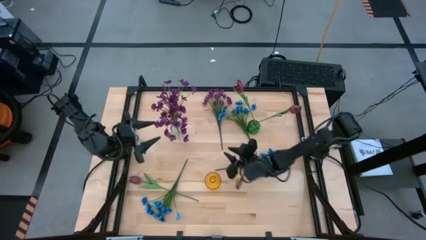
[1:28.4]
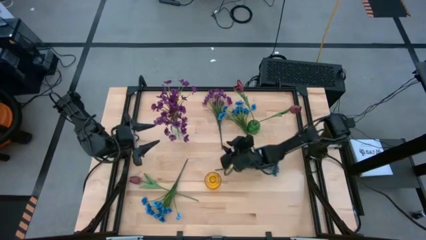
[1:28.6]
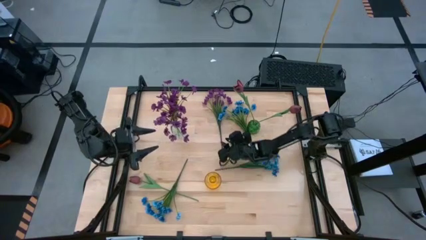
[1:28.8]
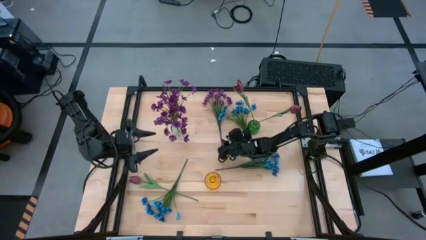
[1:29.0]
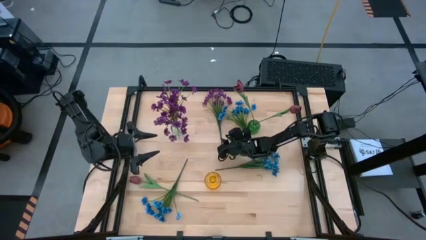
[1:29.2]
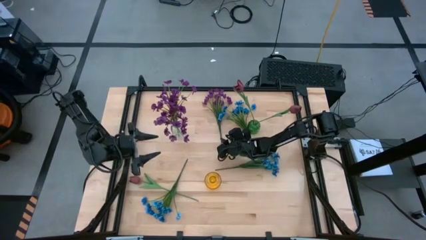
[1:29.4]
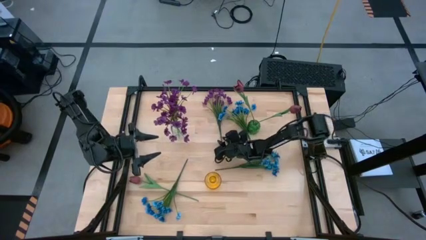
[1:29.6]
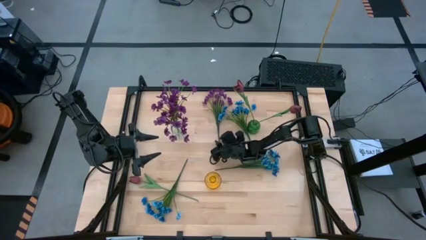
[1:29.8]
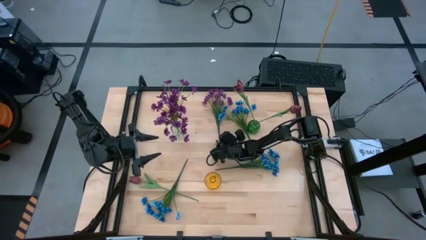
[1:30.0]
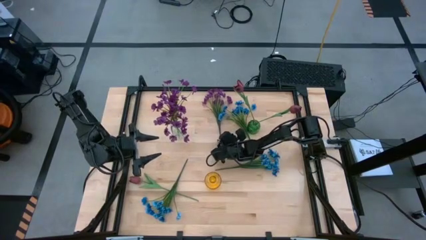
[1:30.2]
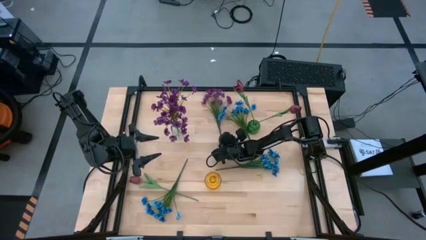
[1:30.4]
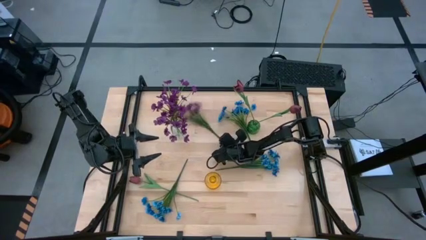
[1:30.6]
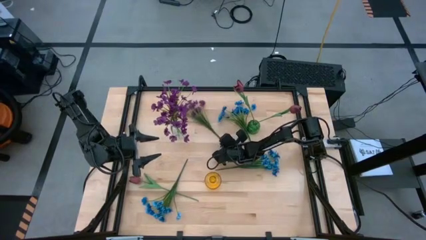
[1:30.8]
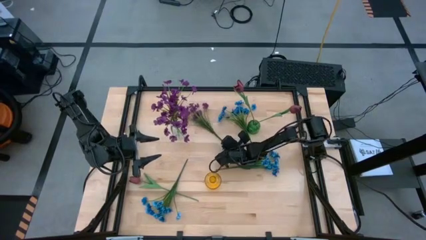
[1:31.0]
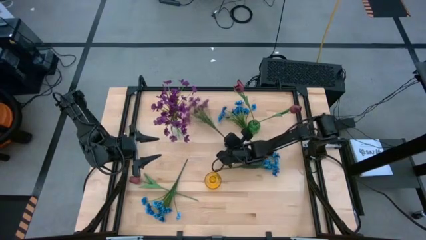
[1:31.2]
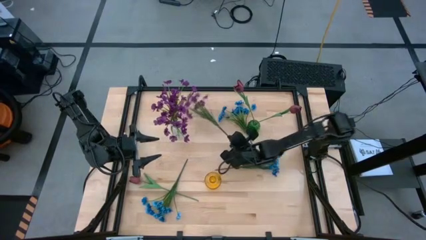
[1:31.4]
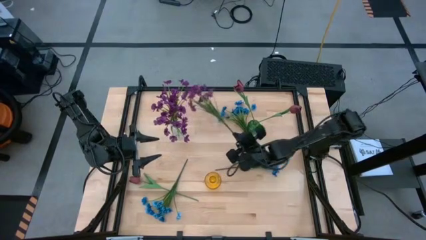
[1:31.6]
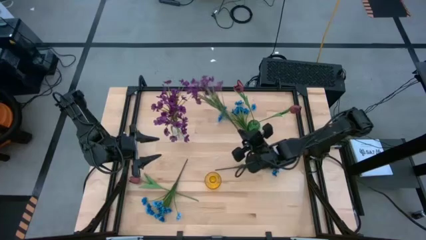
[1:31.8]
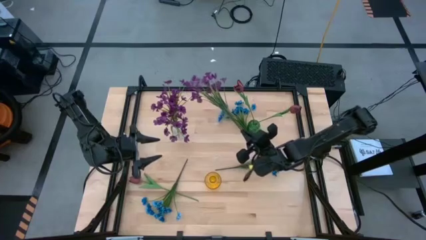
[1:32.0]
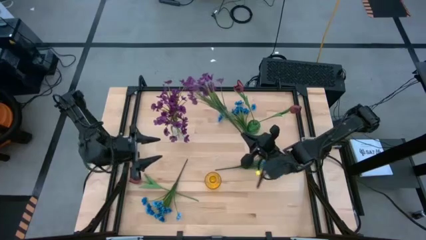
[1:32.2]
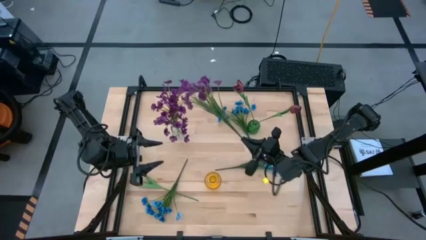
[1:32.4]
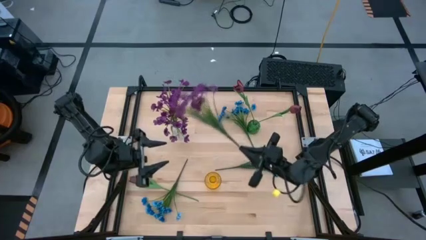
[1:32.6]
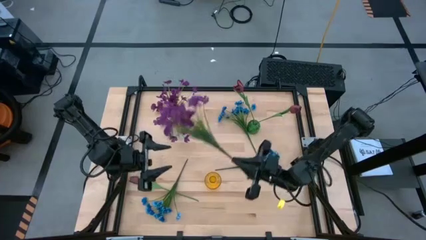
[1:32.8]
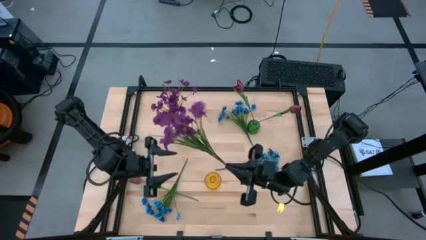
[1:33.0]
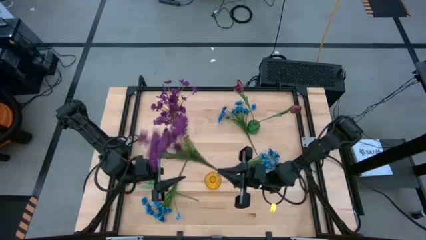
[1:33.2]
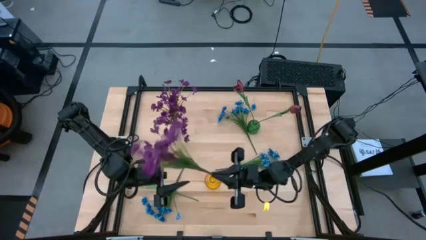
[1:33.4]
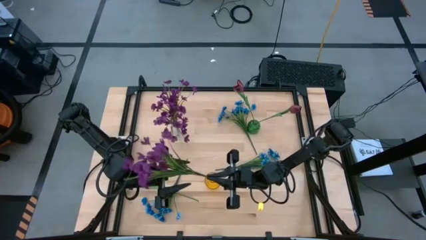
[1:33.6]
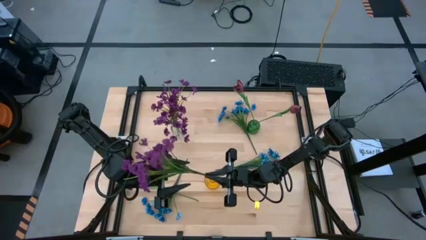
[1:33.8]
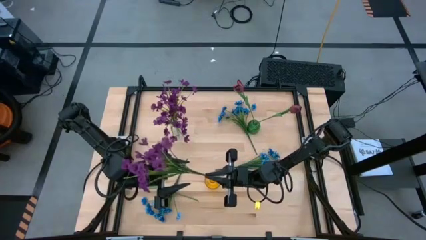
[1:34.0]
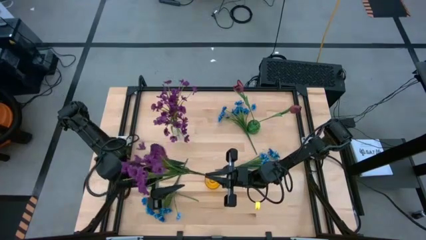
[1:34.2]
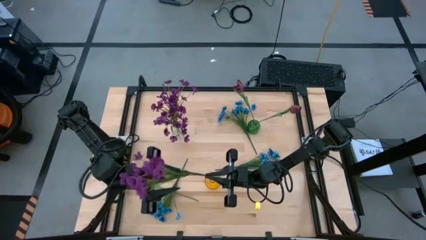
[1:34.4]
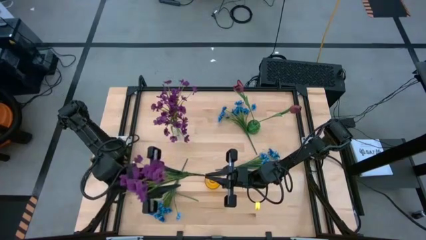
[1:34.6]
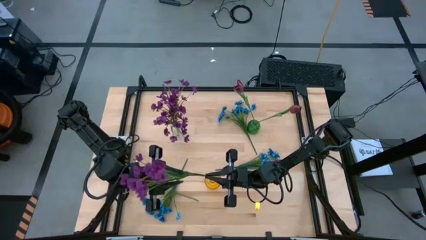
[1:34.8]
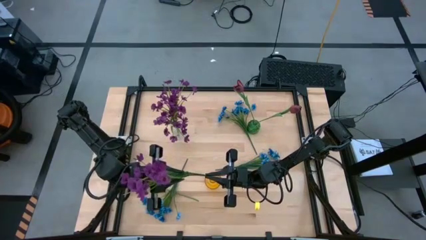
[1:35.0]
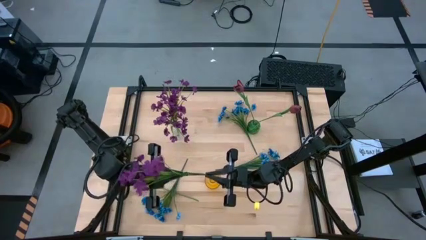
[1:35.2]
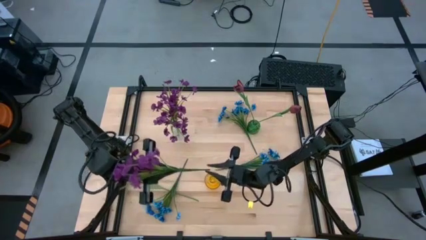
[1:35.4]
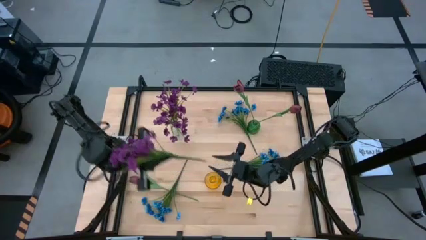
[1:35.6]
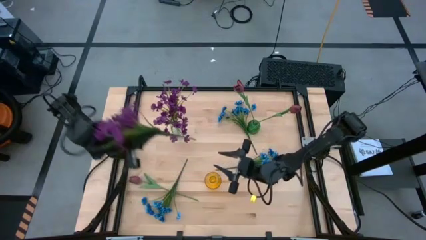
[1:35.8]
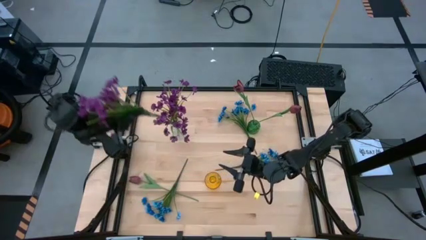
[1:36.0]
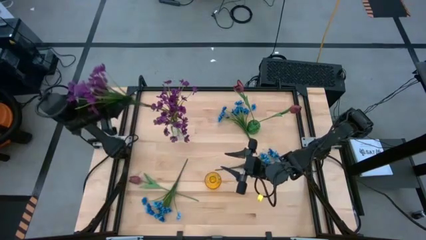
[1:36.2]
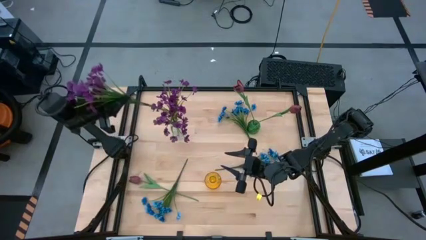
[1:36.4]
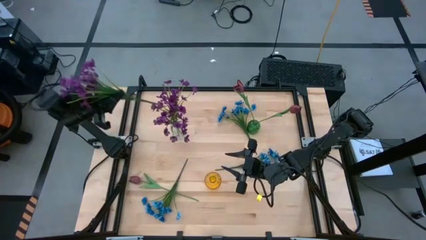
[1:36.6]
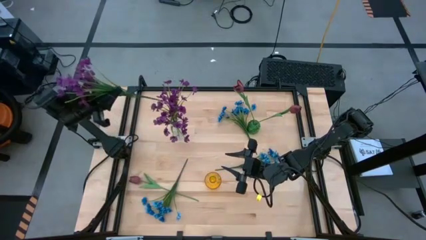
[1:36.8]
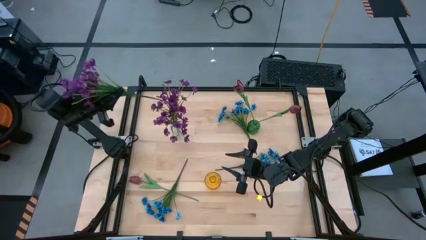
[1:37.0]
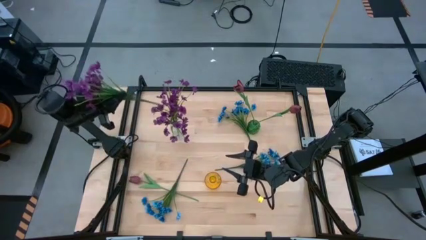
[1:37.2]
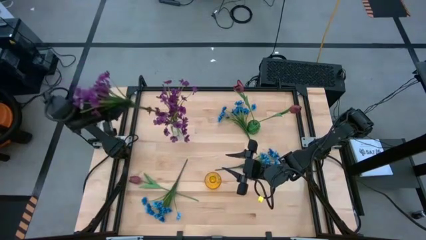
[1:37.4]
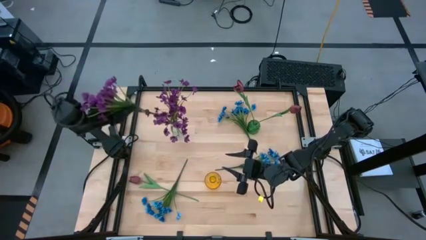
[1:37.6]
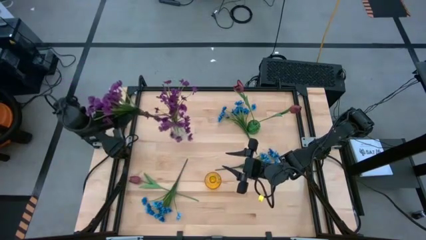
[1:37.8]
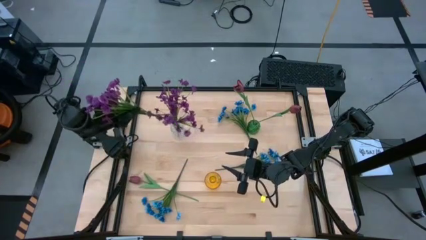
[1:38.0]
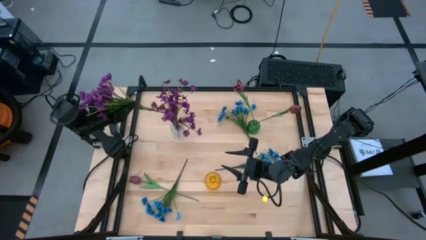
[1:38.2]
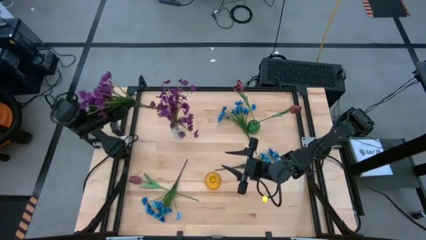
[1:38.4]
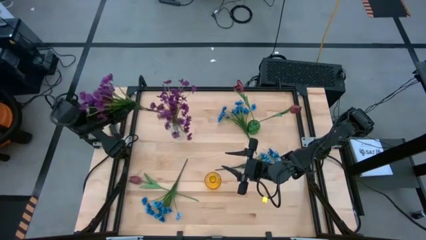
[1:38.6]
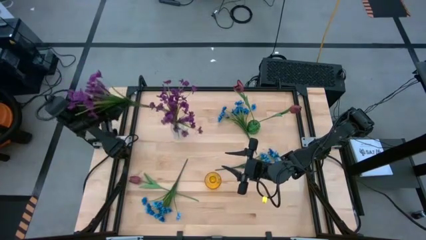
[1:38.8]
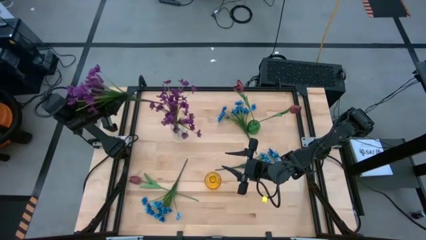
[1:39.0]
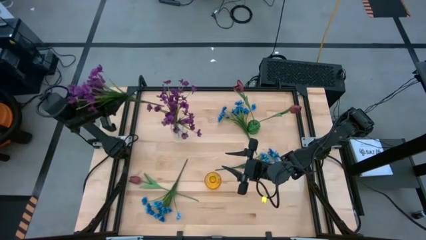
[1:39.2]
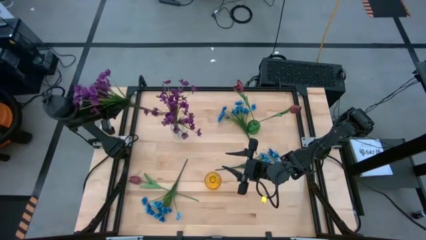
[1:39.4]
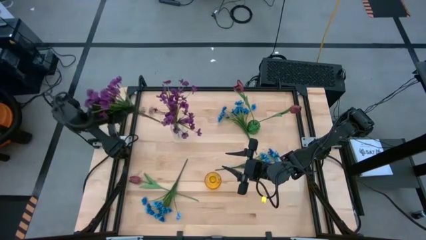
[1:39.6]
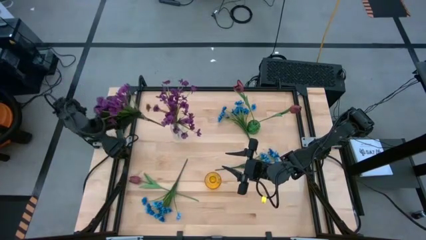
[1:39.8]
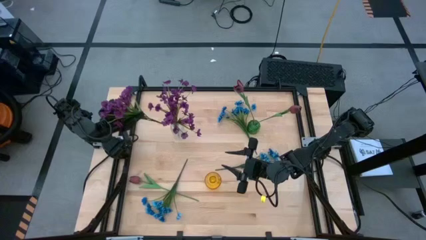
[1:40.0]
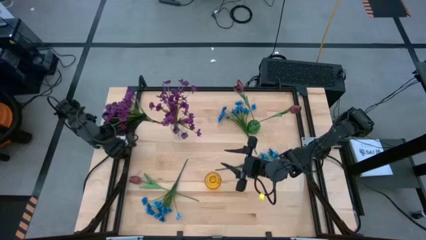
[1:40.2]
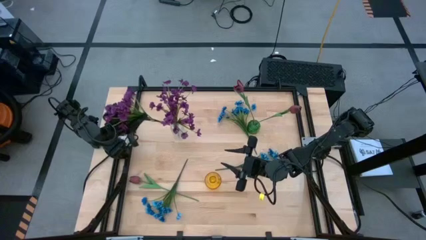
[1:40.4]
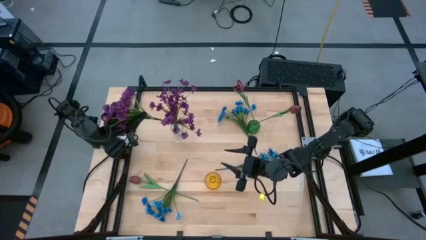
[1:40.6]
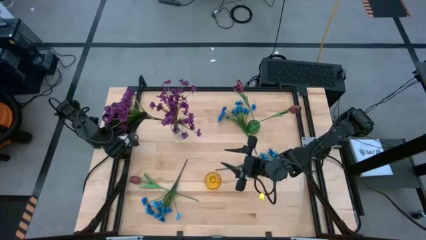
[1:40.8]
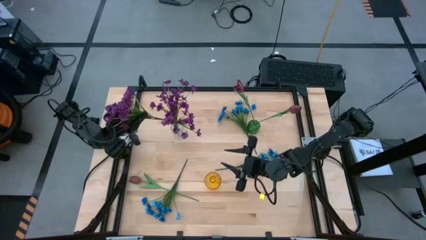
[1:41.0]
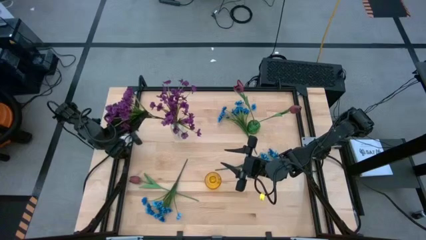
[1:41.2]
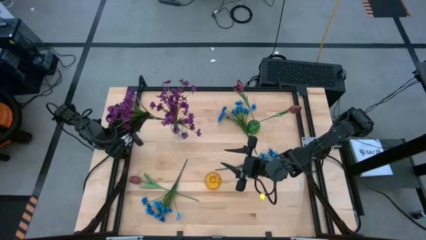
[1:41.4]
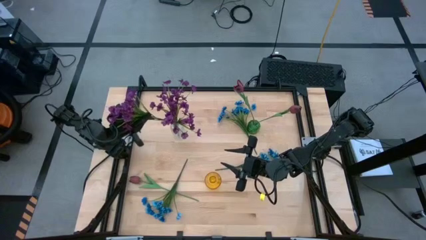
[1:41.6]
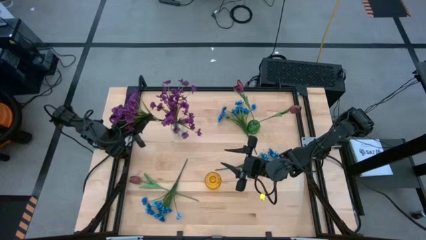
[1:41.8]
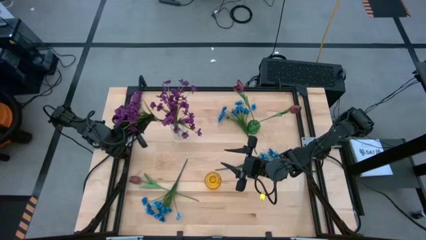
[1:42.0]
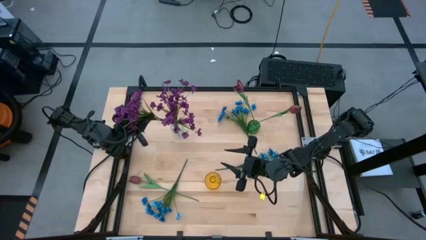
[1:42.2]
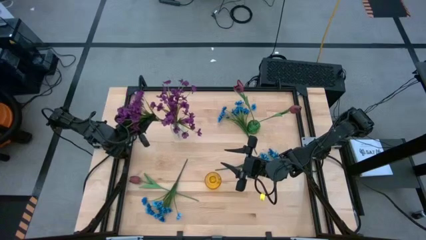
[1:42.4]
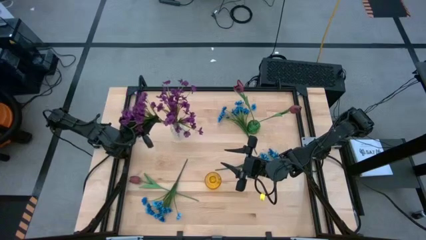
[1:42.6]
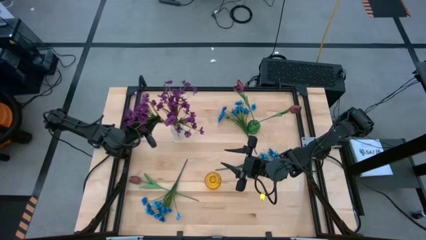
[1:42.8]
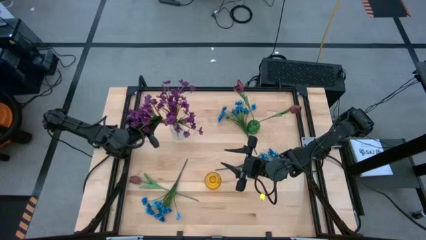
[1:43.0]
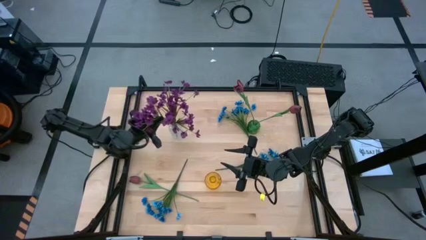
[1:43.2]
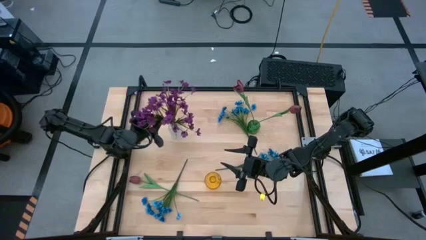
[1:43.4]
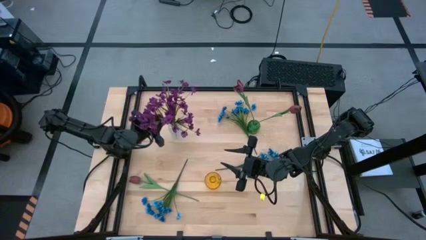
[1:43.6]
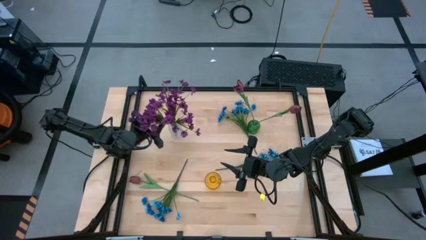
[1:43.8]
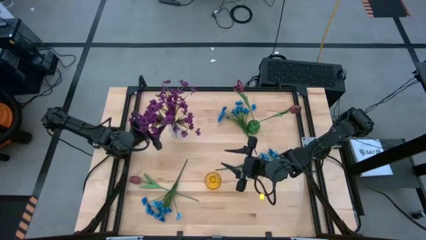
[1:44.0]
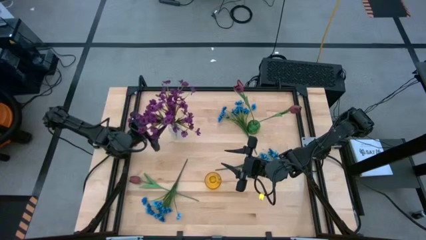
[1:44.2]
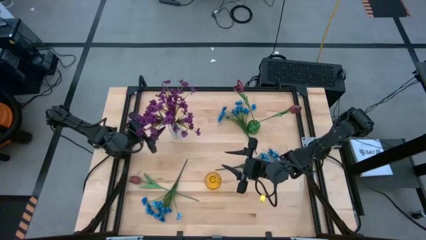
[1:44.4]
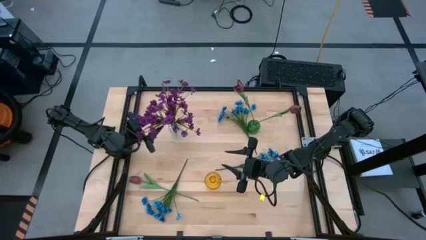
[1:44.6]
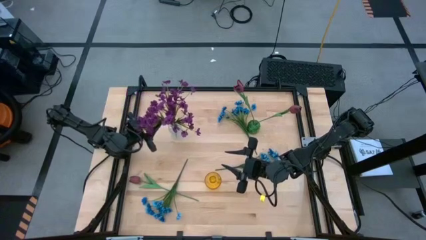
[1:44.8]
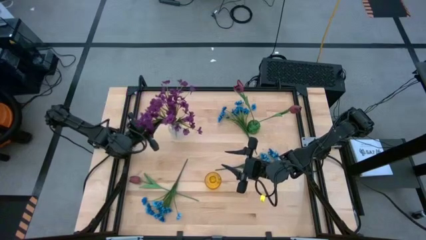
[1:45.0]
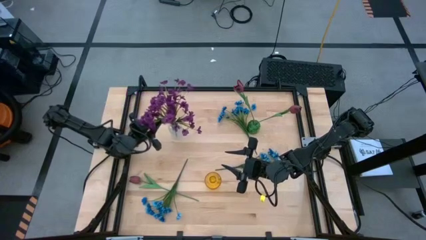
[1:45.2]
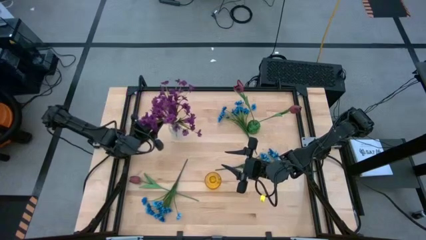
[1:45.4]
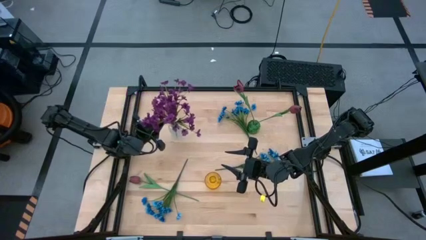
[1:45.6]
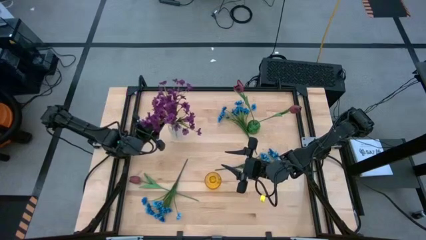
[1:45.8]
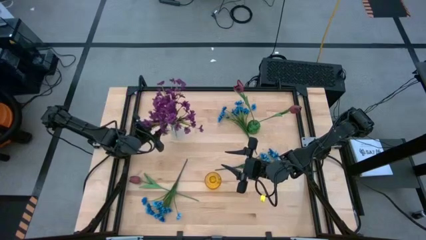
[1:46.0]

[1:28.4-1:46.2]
Task: Sort flowers into vase by color
Put the violet flowers into the transparent vase
